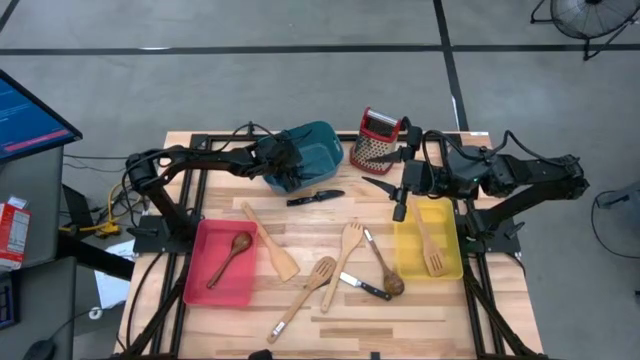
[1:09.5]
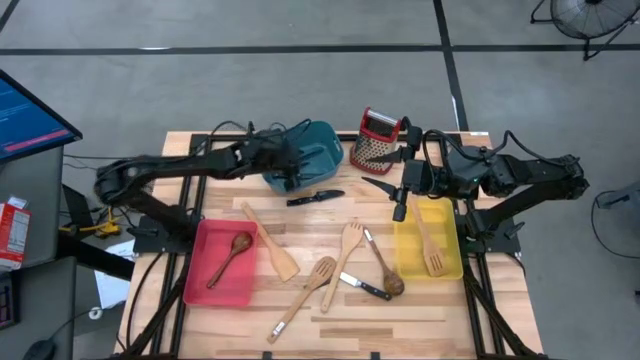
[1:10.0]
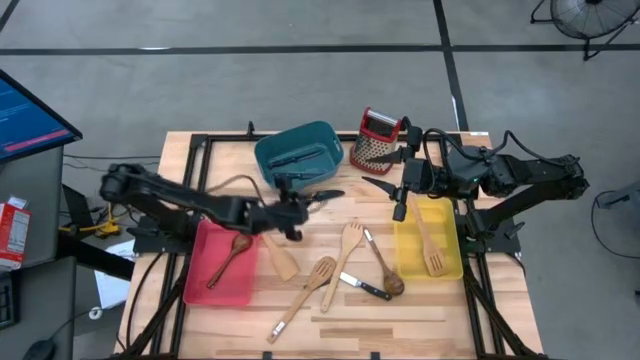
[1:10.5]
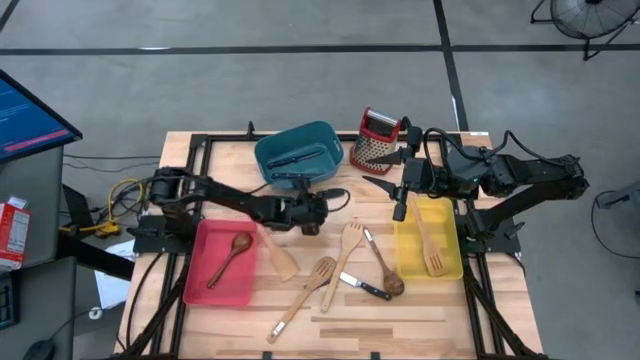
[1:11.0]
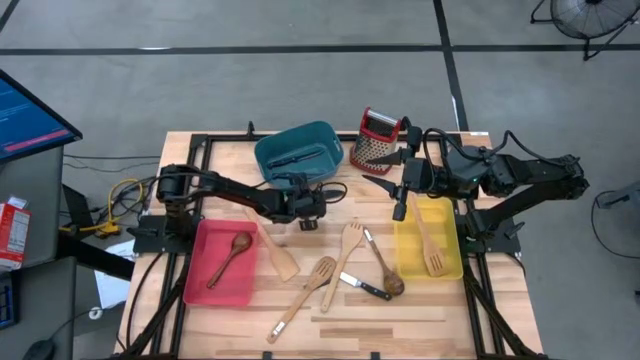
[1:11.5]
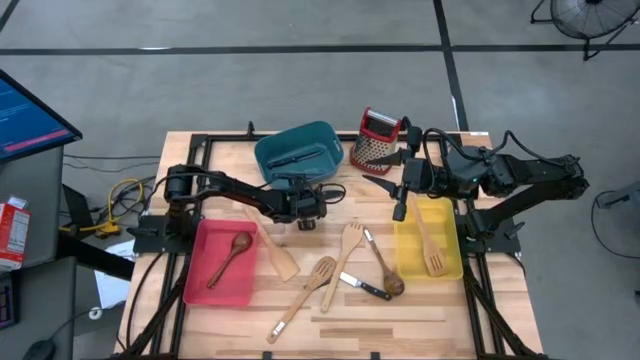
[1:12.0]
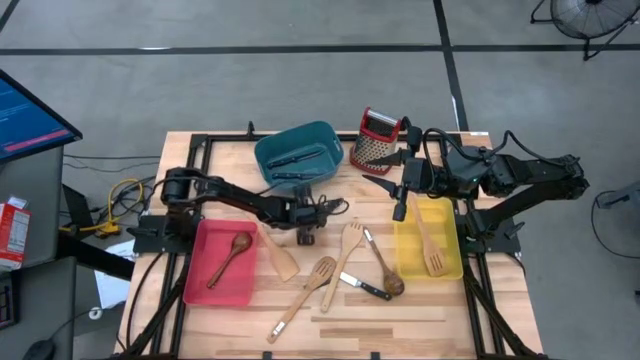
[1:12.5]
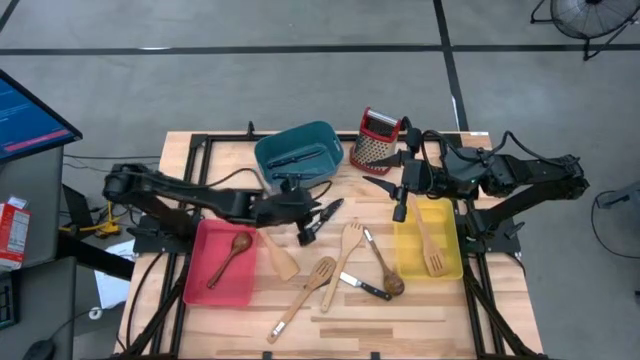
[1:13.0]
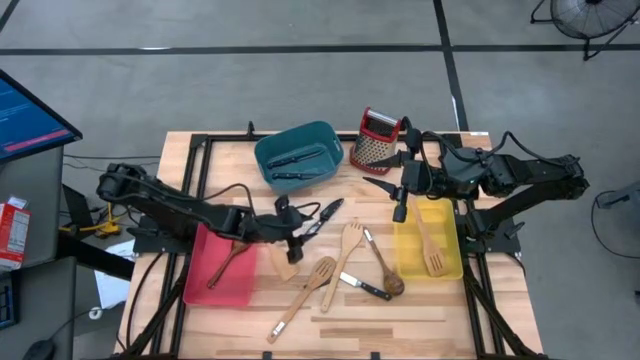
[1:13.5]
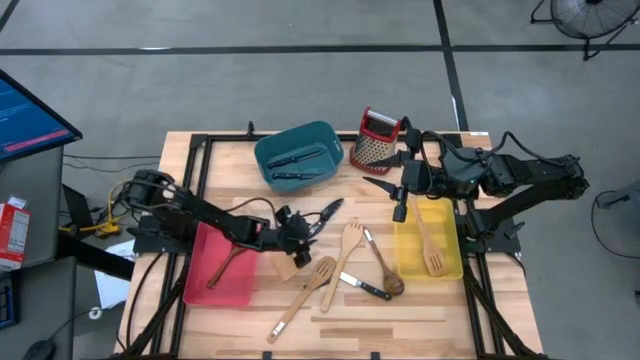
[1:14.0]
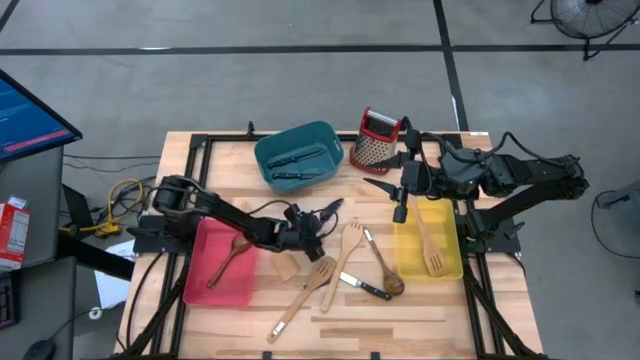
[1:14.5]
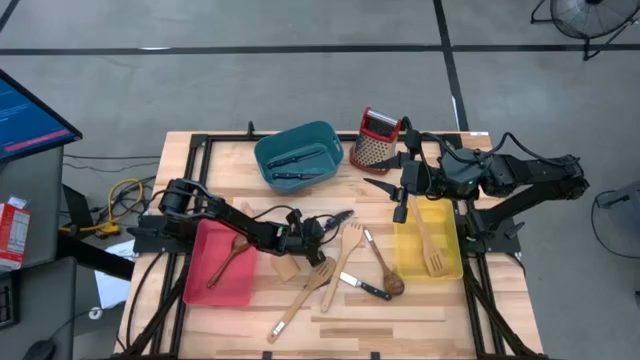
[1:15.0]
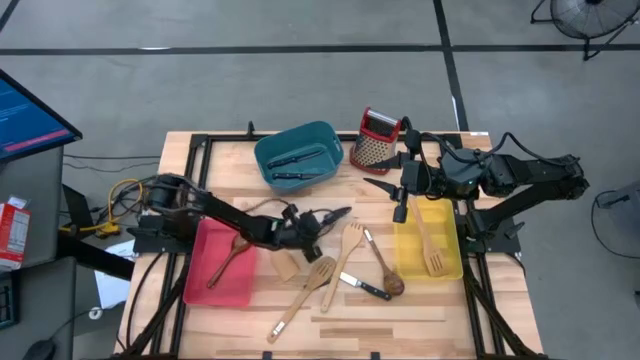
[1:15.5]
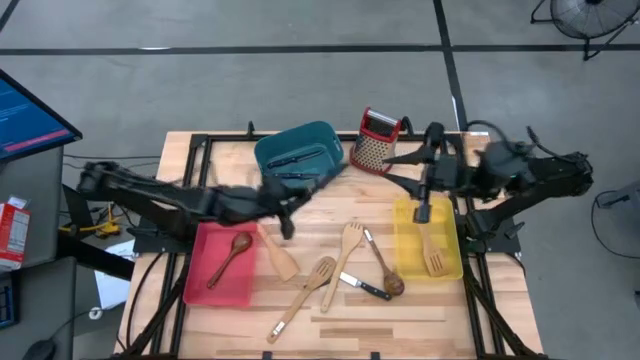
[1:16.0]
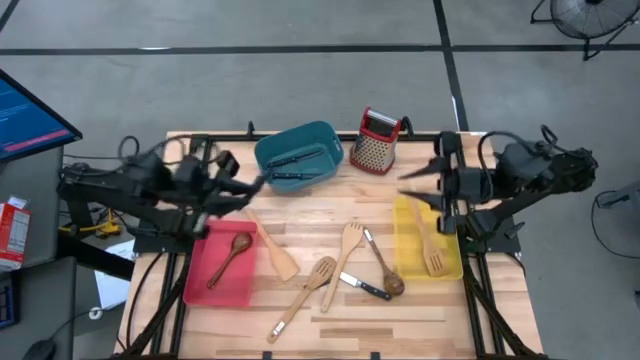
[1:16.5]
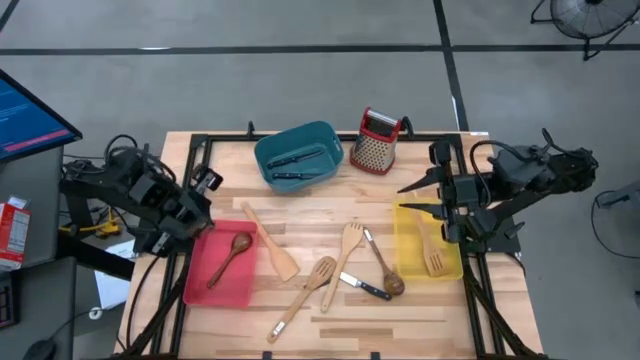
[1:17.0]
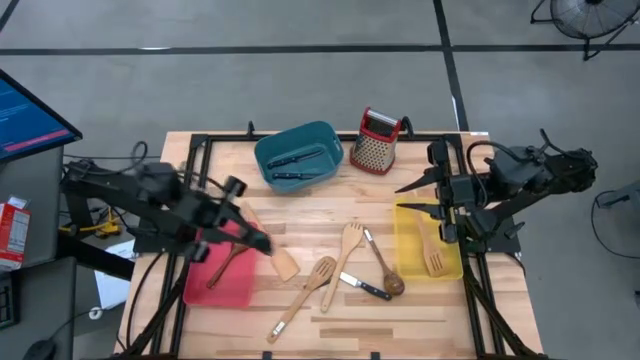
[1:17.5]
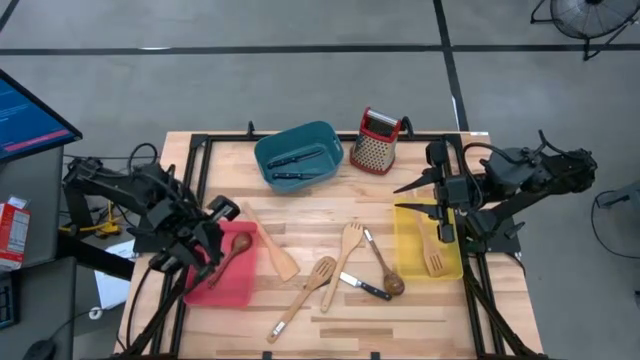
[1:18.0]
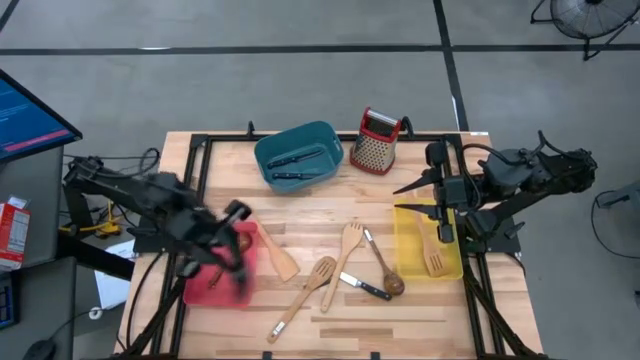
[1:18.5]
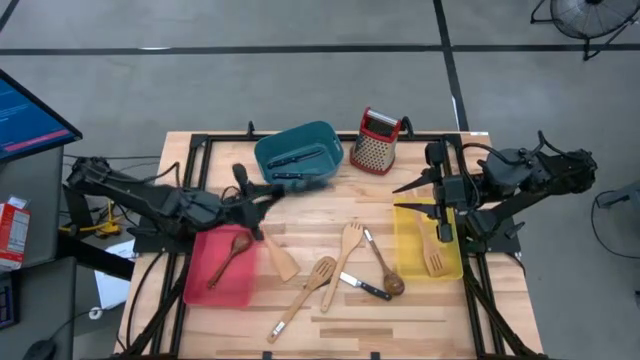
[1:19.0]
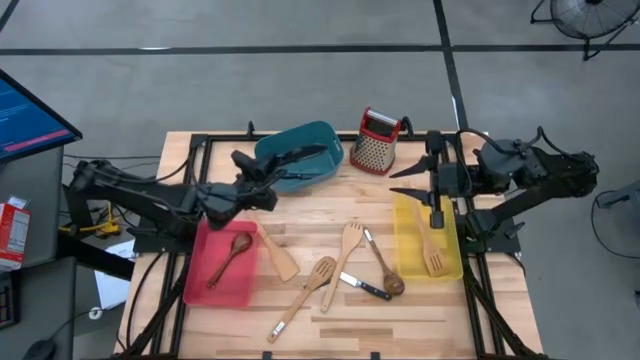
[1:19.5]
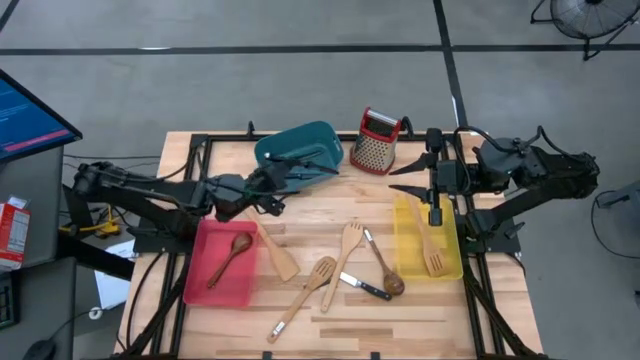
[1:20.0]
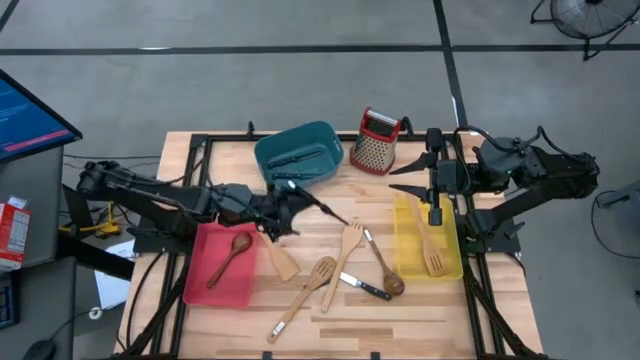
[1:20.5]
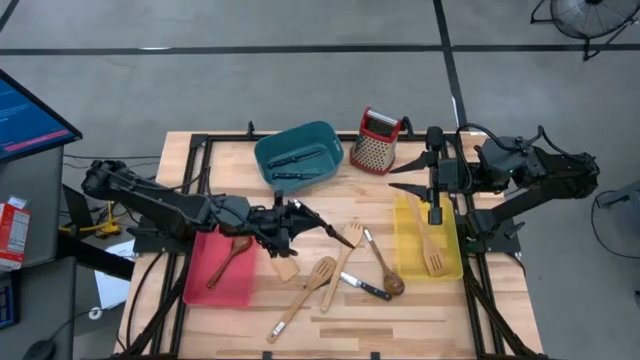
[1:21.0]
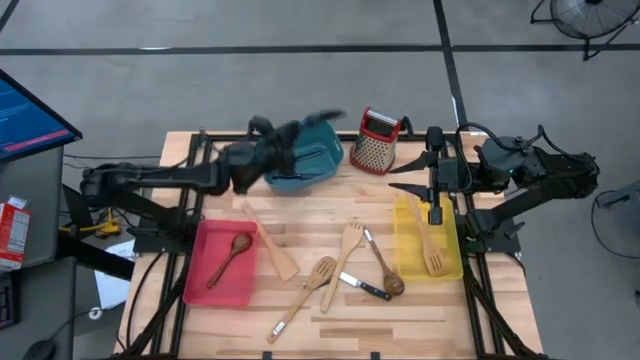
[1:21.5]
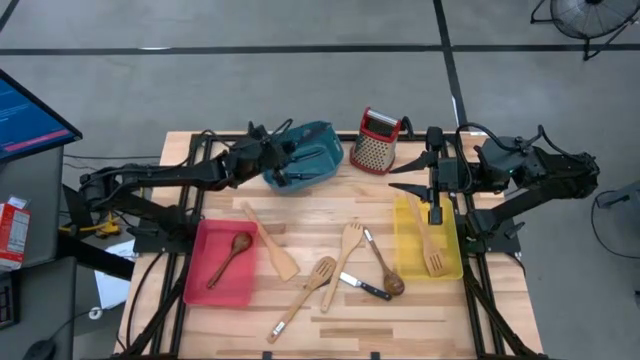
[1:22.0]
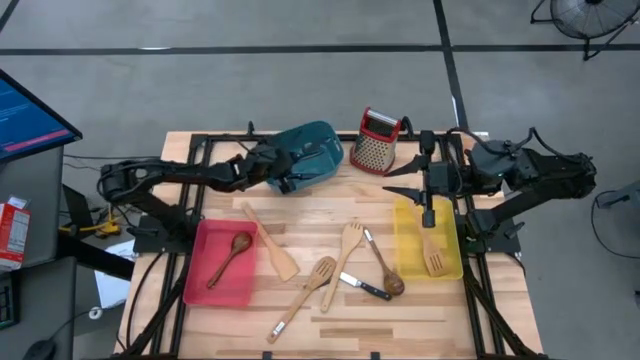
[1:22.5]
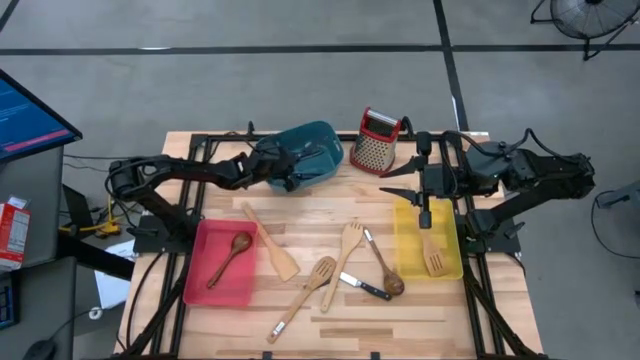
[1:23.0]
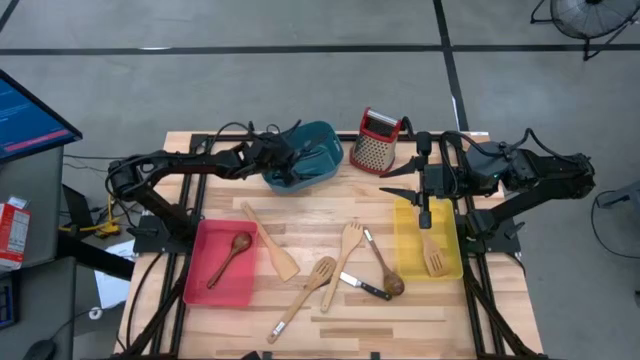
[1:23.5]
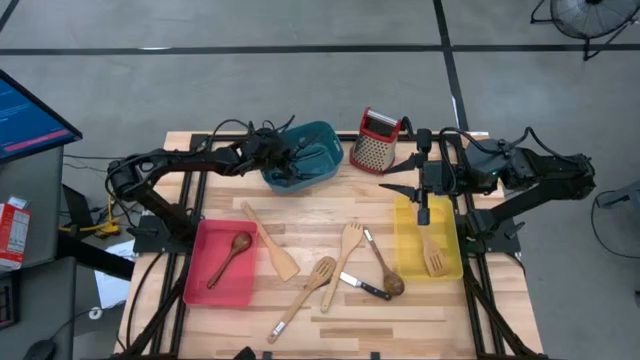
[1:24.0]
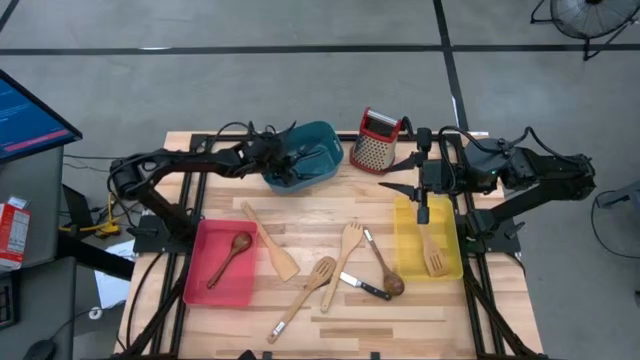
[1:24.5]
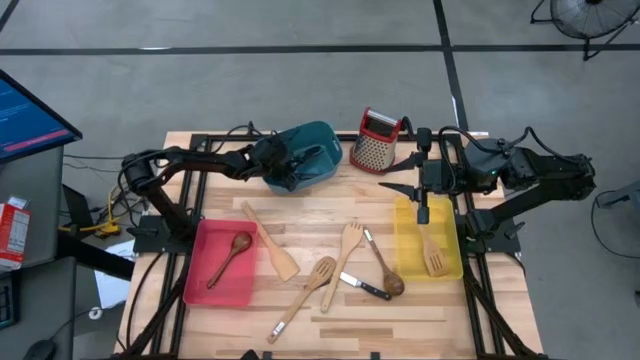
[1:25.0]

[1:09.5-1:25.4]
Task: Pick & Place Kitchen Items
Put the black table knife into the blue bin
